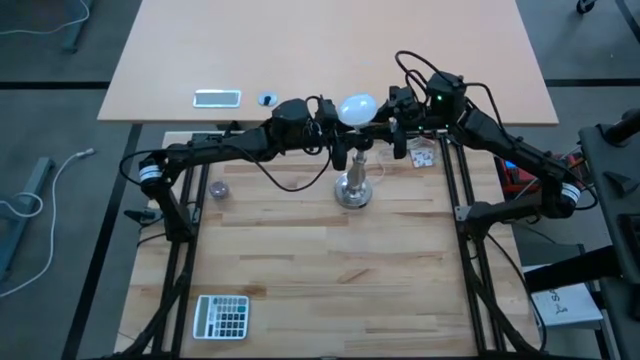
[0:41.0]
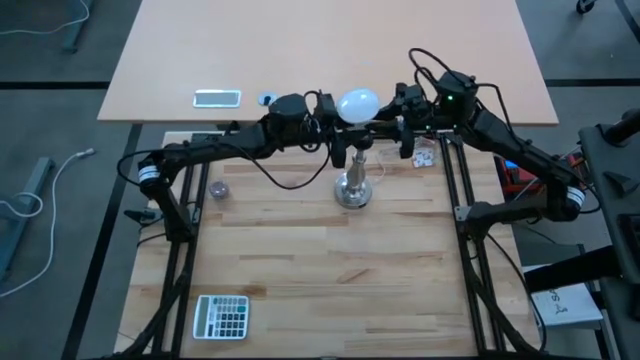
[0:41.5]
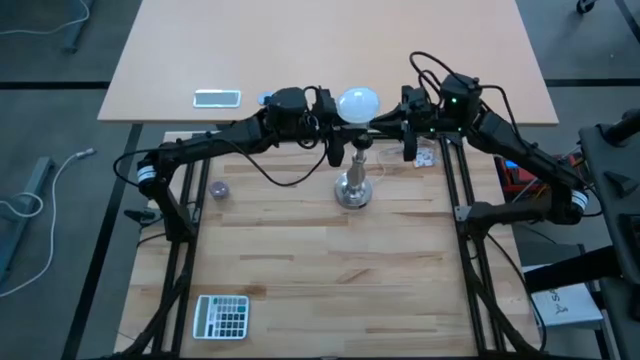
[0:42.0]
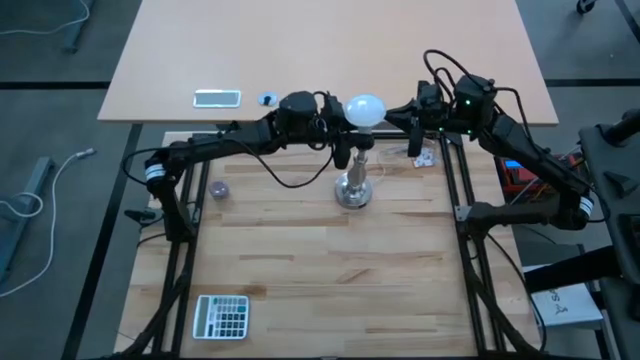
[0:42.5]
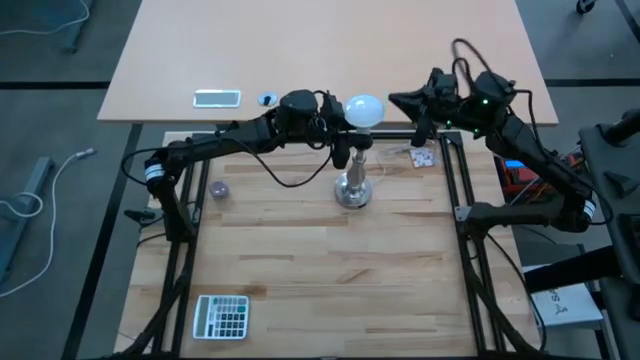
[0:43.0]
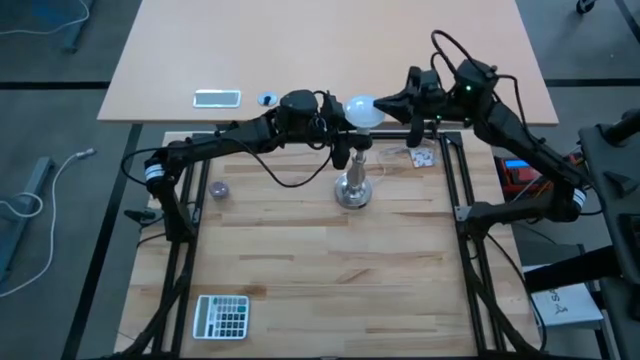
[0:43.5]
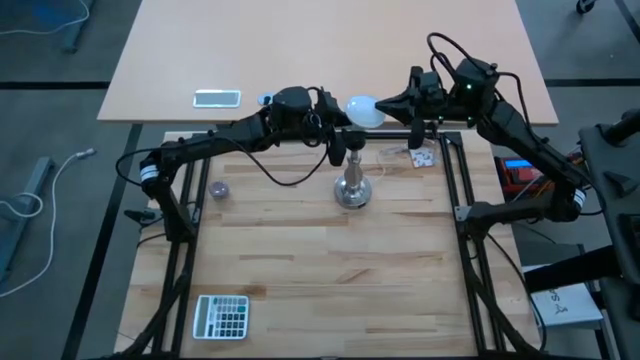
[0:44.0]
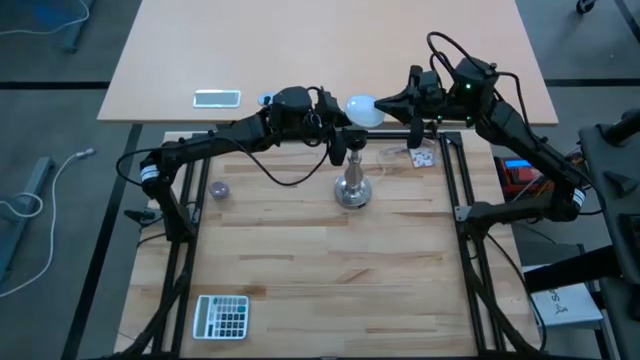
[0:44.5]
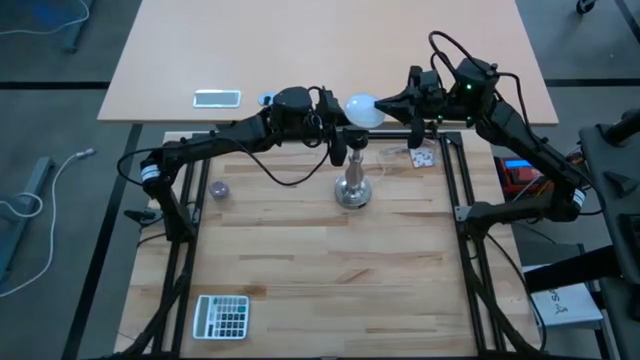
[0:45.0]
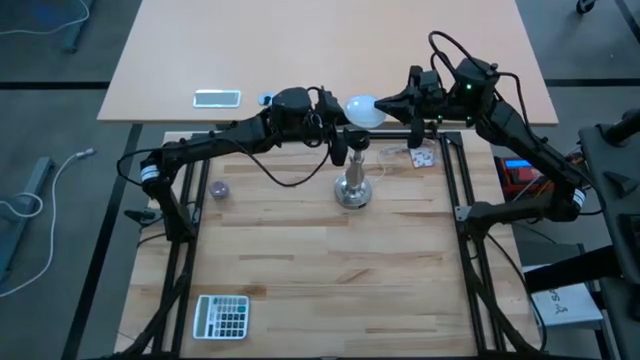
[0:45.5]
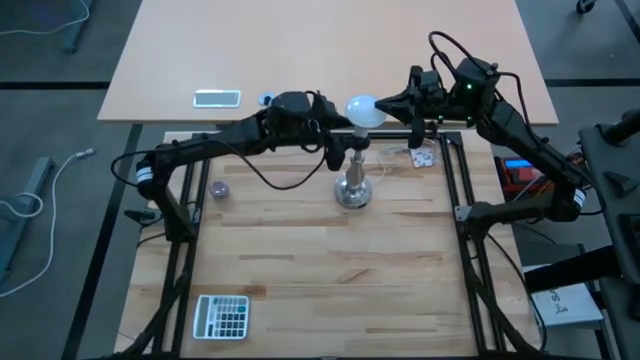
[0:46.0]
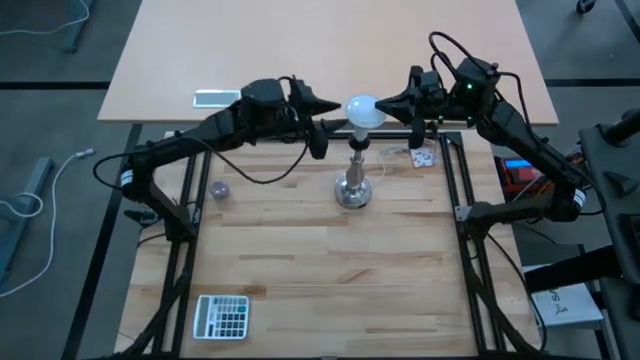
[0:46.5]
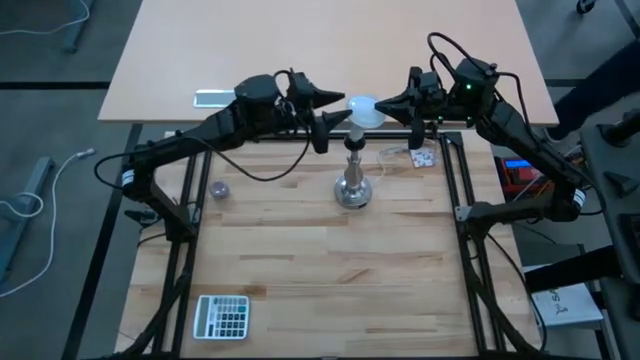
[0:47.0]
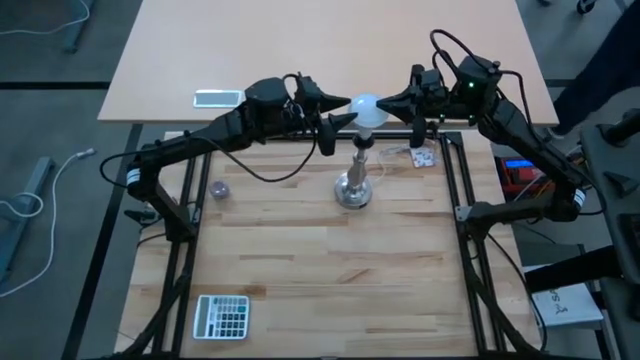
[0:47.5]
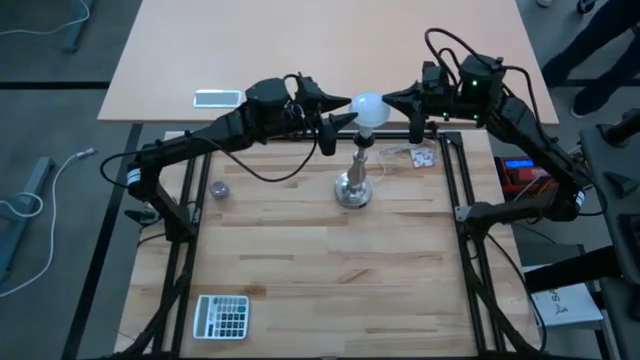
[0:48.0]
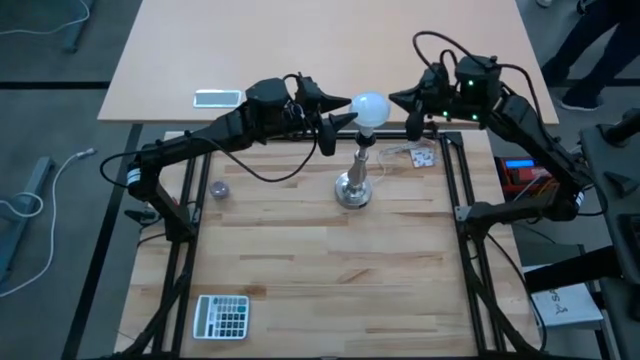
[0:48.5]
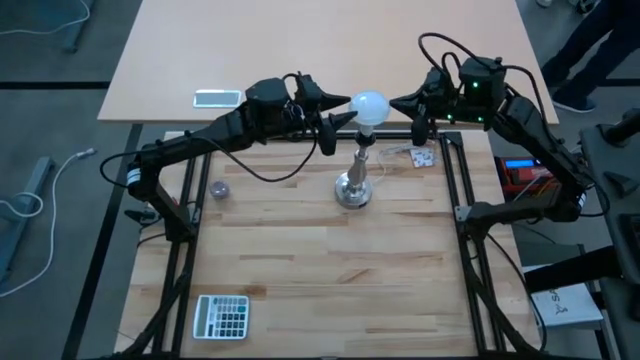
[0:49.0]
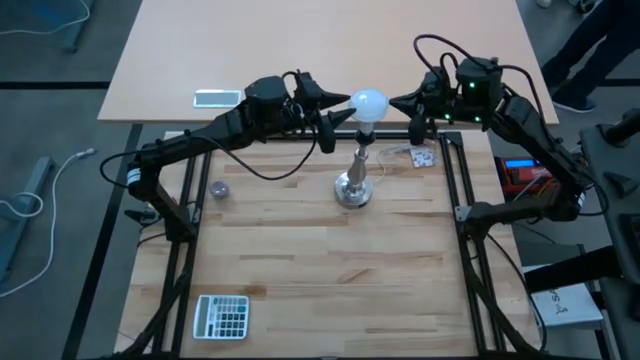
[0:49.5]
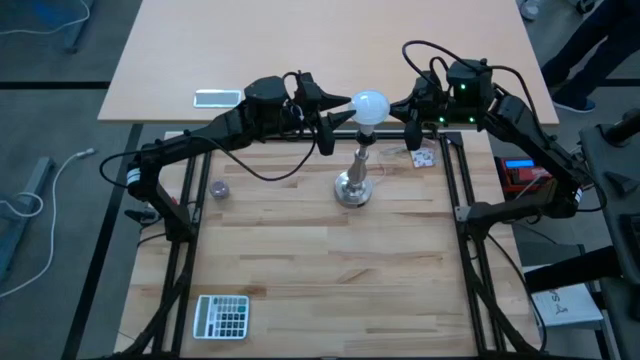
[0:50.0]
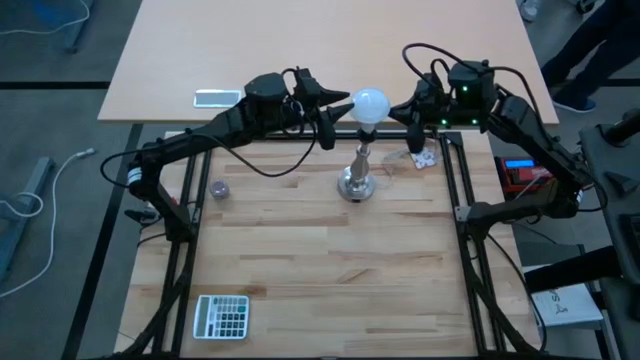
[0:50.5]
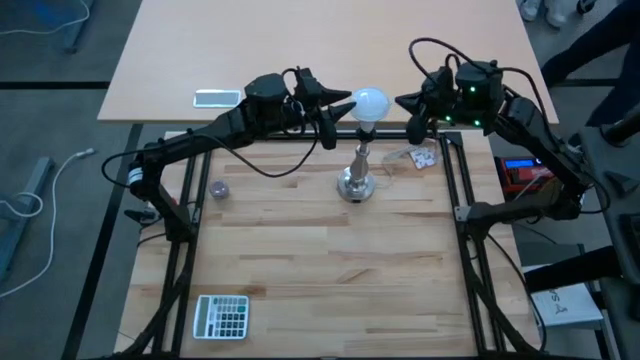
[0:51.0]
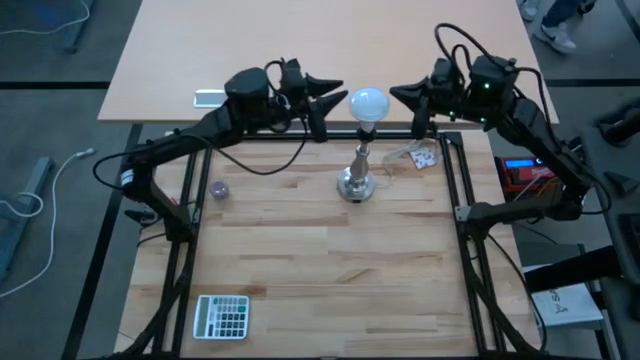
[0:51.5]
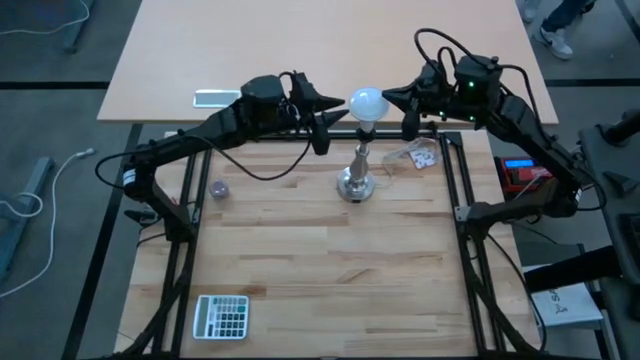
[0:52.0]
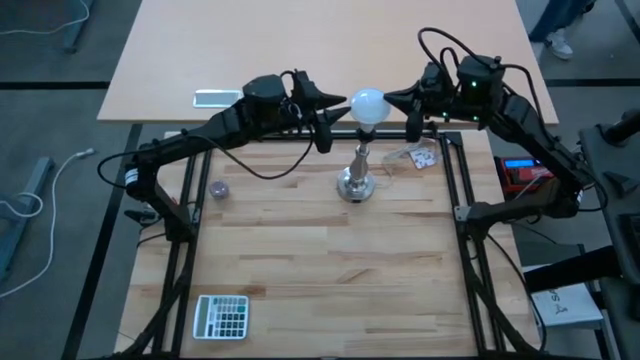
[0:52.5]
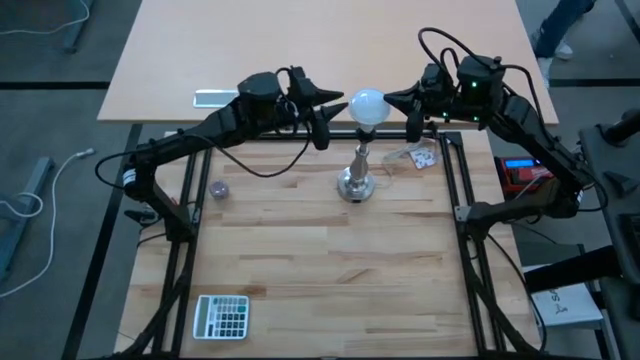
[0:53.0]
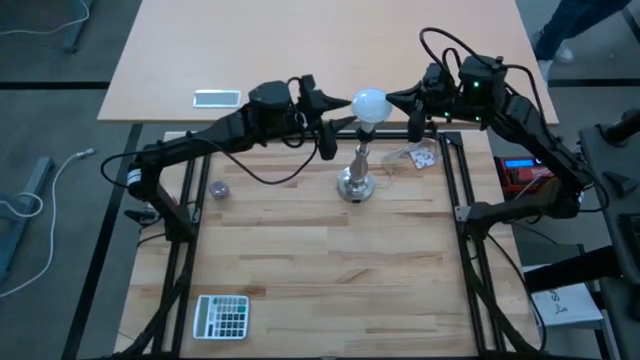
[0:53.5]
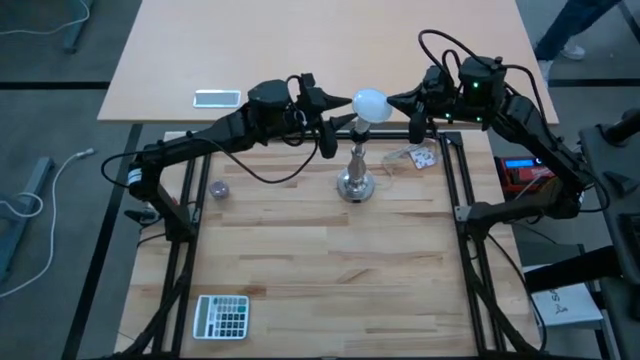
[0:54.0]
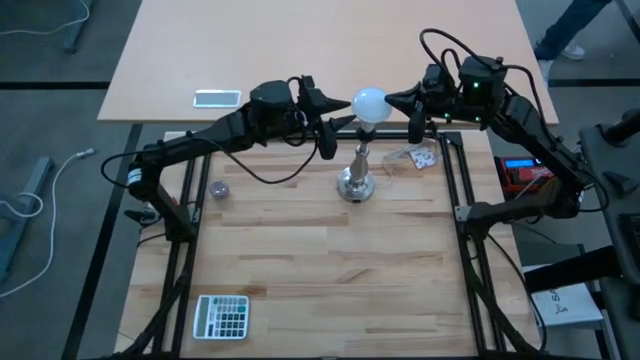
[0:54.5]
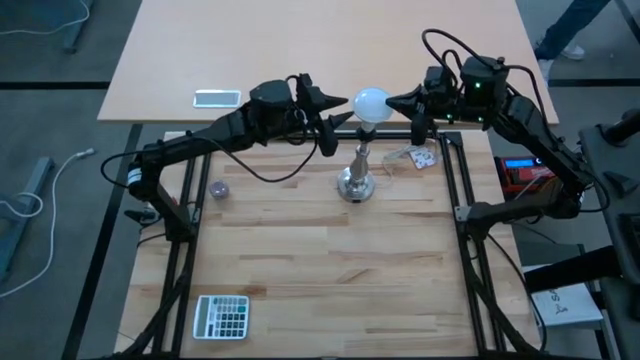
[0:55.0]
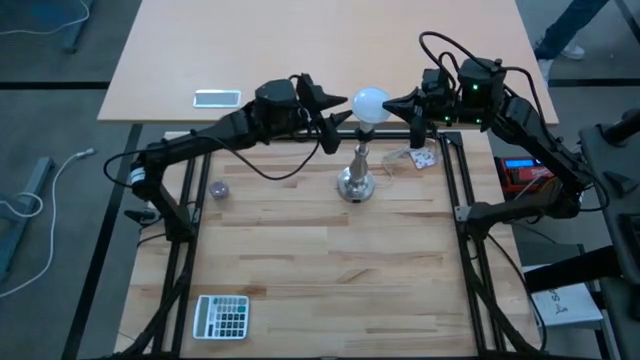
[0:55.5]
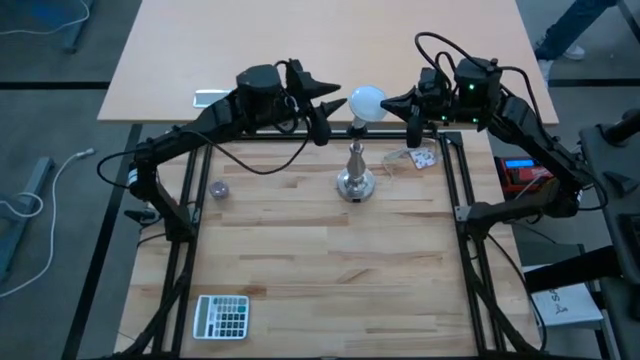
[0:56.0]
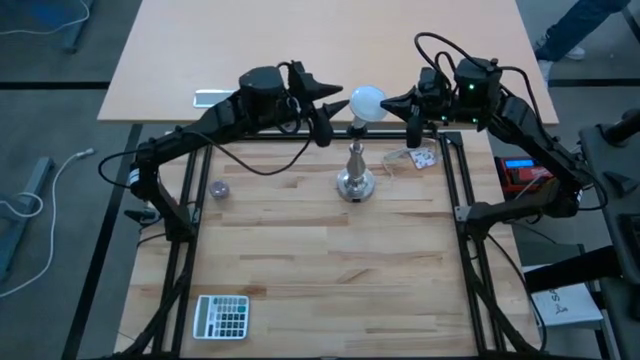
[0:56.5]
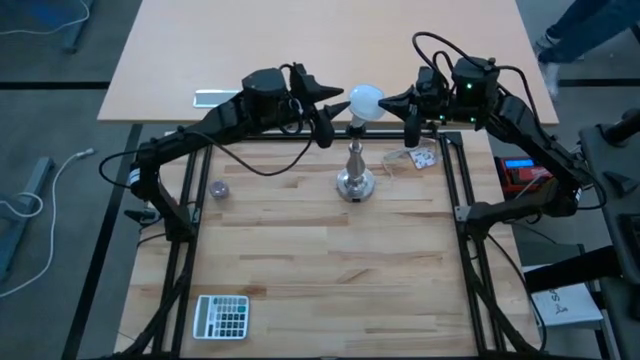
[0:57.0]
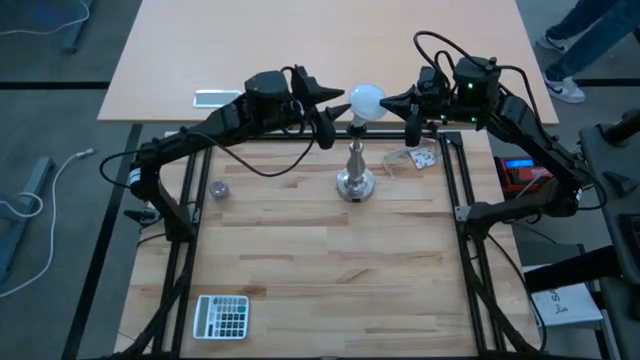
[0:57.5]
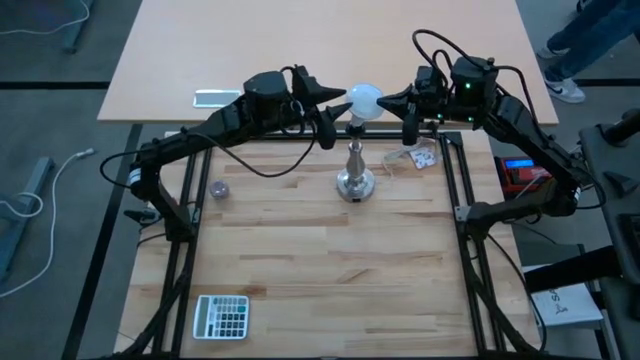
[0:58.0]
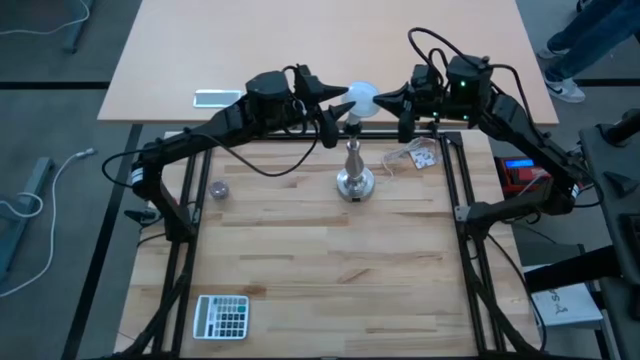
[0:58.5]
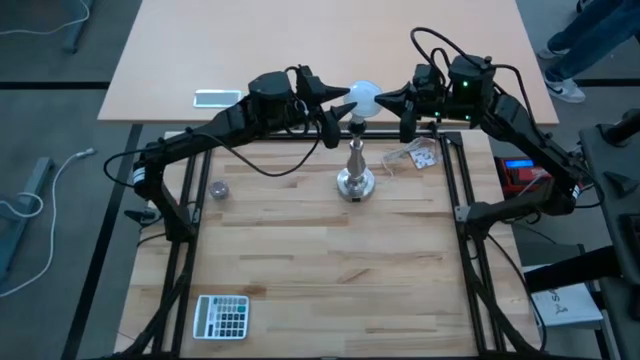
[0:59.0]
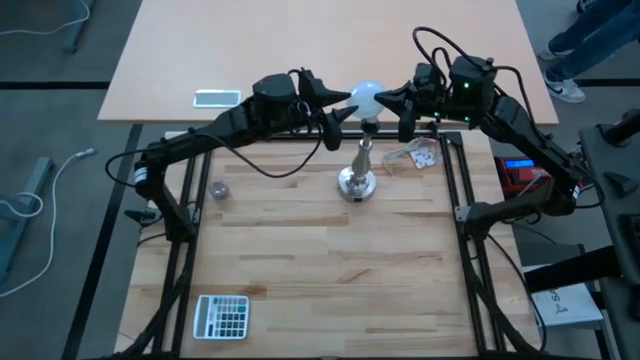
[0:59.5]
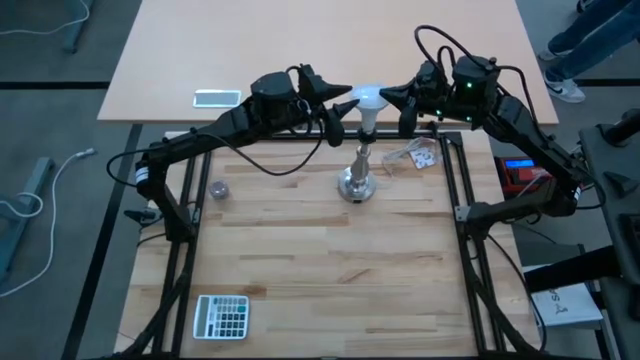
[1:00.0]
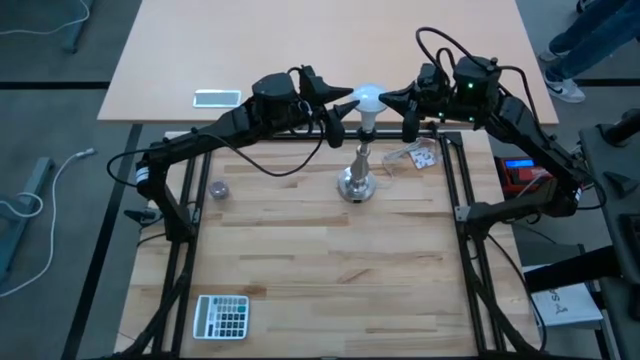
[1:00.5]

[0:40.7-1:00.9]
Task: Screw lightbulb
Insert the light bulb into the lamp

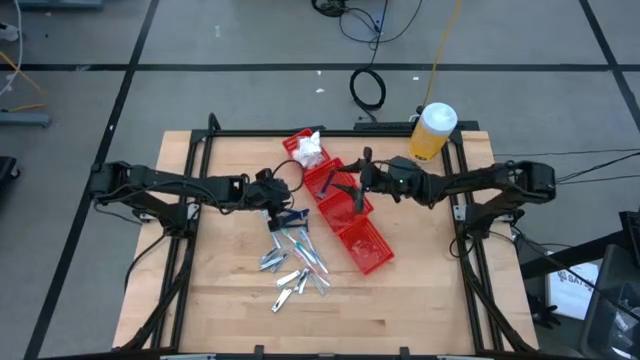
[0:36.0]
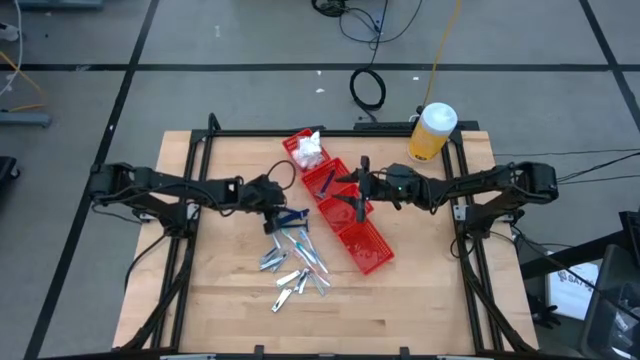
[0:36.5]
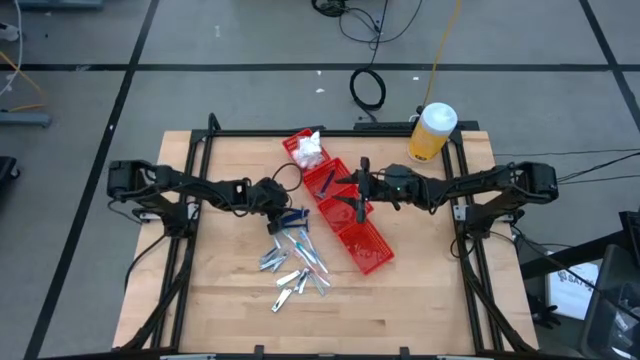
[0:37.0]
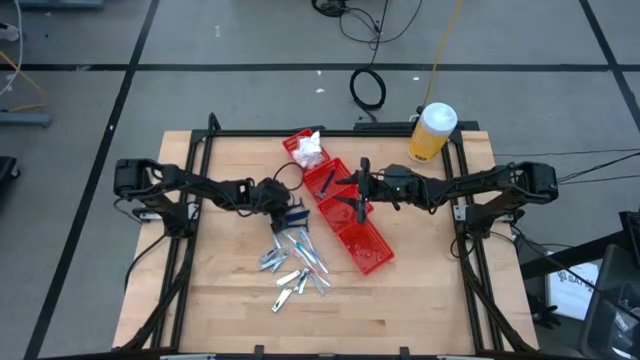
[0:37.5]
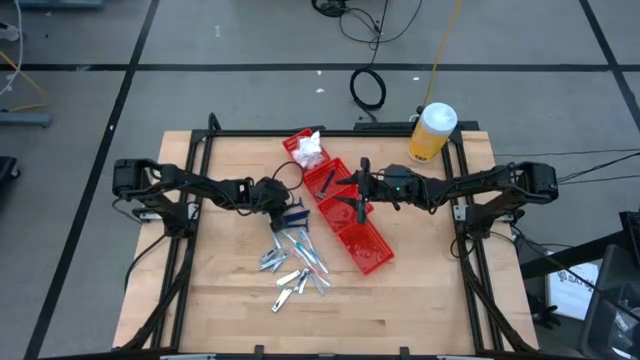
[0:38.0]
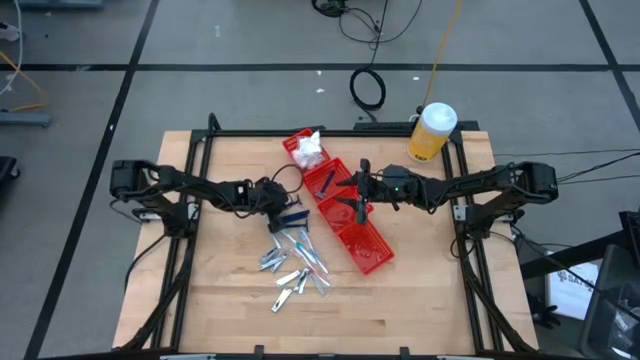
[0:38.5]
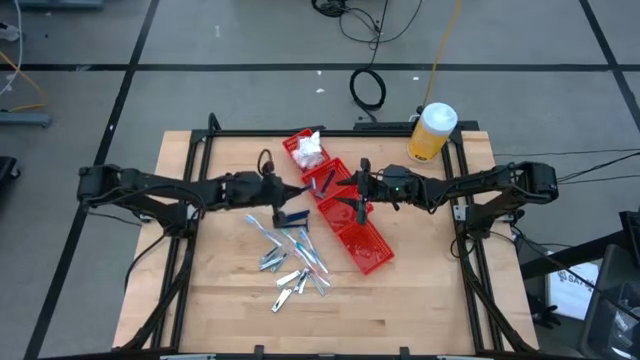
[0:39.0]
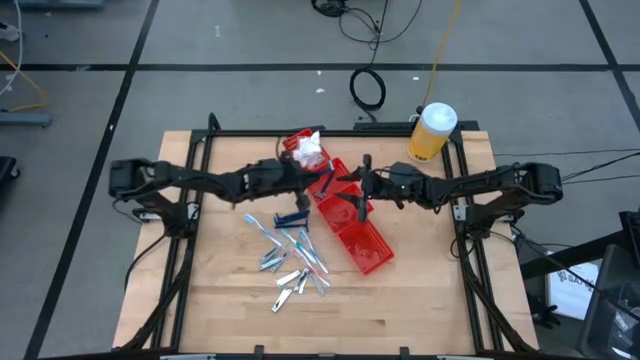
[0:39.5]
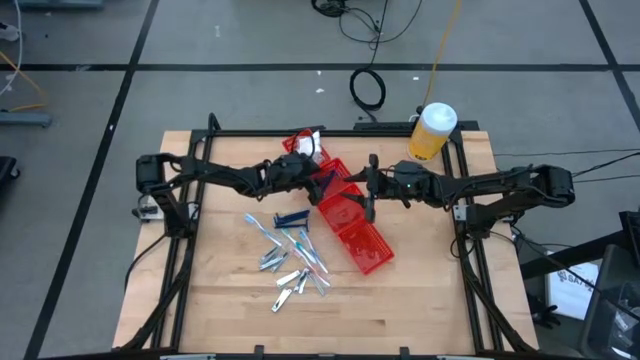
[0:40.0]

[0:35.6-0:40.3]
Task: Pick & Place Travel size toiletries
Put the blue razor into the top middle red bin
